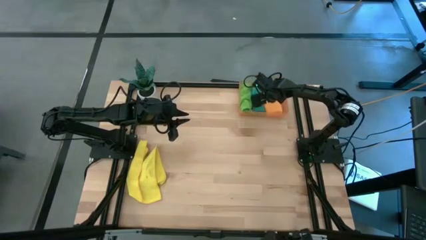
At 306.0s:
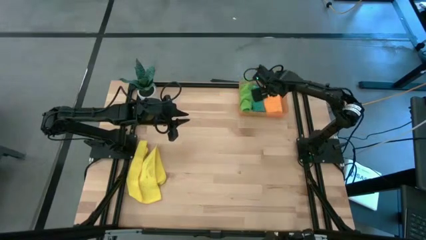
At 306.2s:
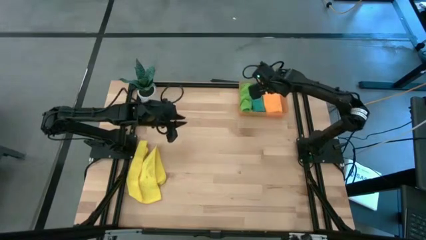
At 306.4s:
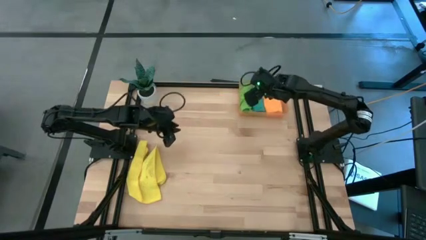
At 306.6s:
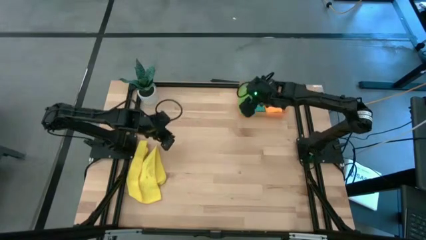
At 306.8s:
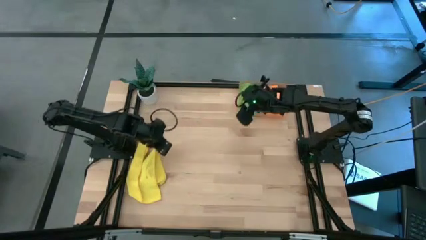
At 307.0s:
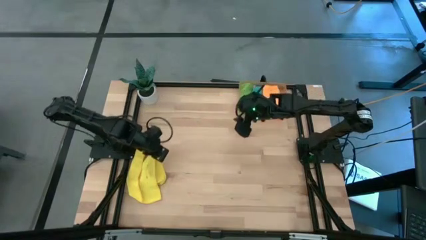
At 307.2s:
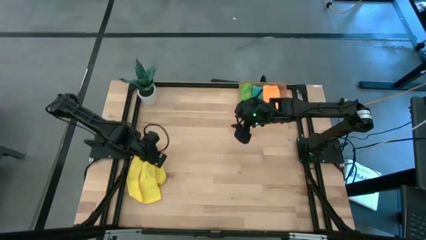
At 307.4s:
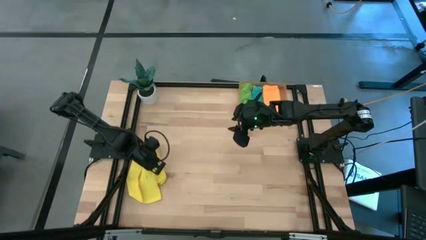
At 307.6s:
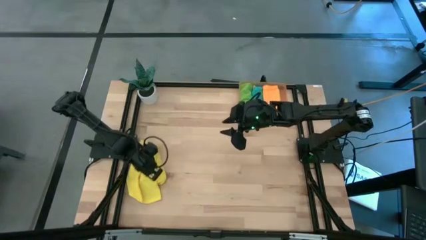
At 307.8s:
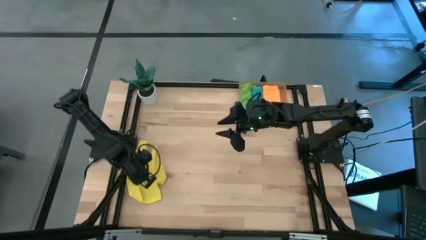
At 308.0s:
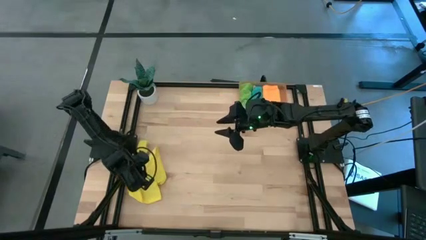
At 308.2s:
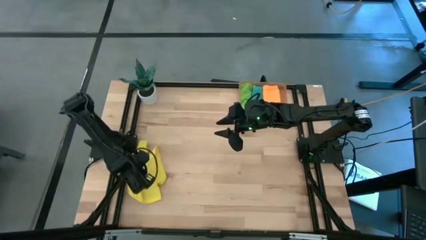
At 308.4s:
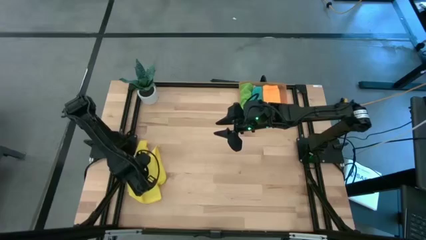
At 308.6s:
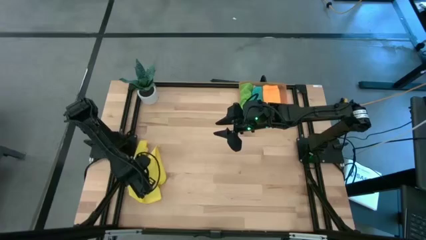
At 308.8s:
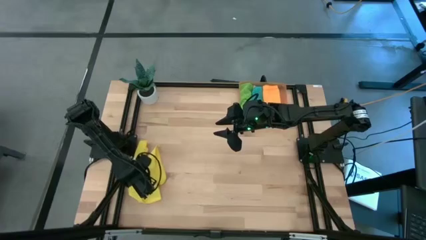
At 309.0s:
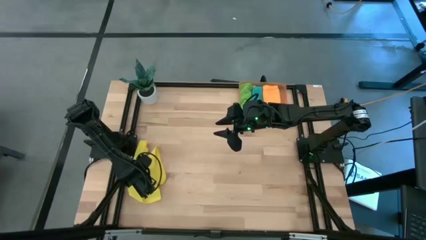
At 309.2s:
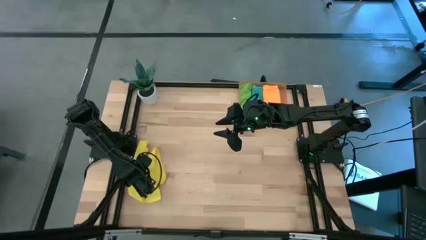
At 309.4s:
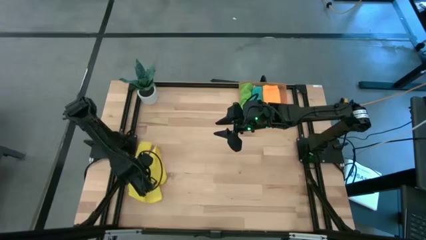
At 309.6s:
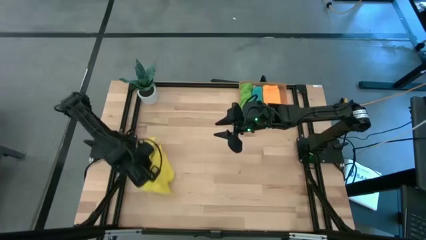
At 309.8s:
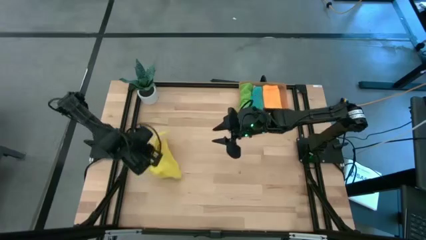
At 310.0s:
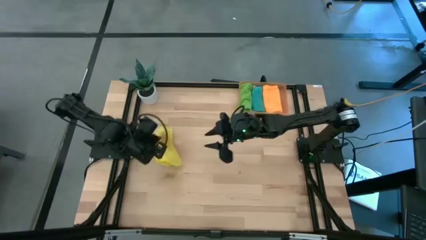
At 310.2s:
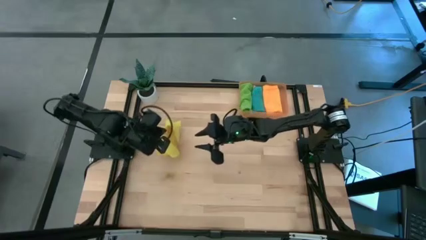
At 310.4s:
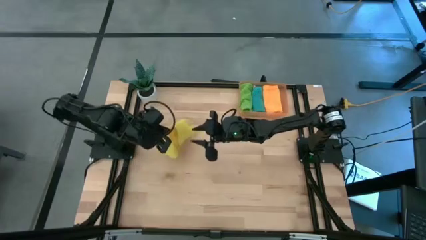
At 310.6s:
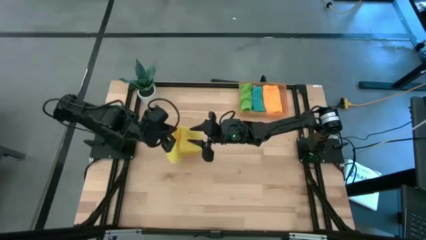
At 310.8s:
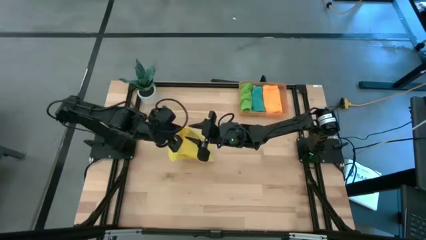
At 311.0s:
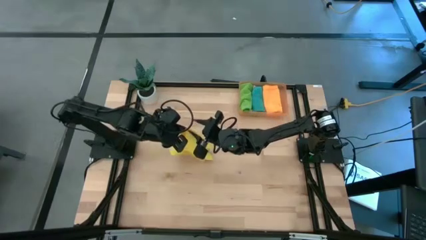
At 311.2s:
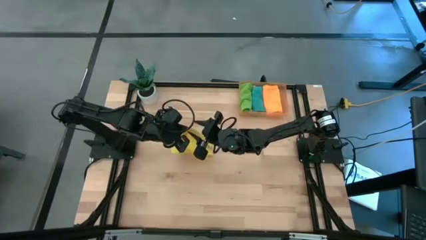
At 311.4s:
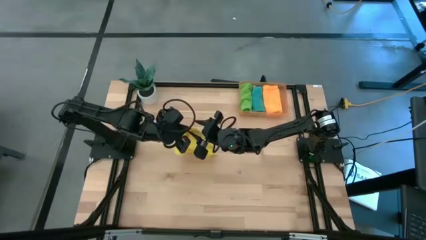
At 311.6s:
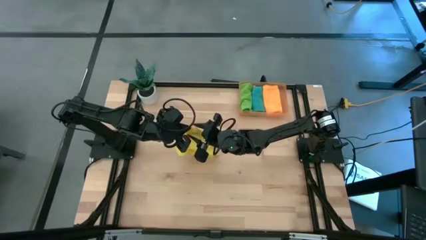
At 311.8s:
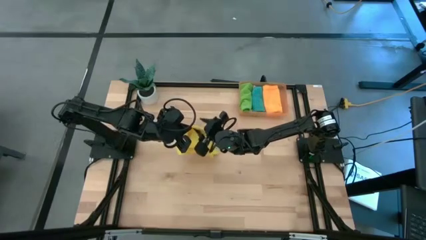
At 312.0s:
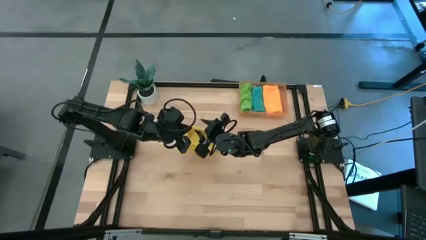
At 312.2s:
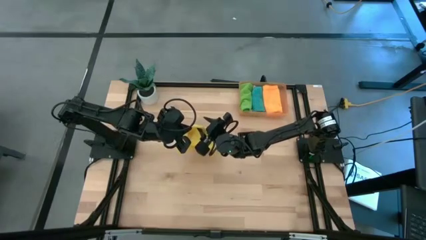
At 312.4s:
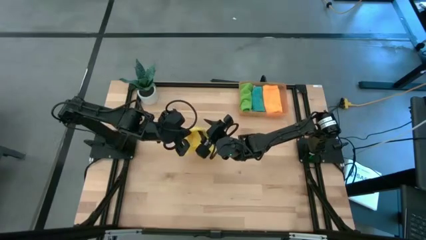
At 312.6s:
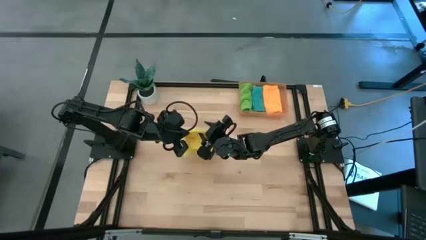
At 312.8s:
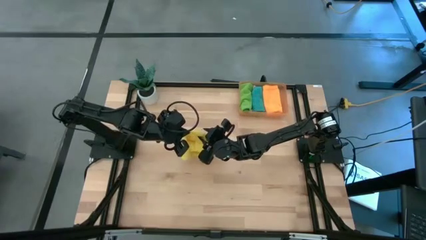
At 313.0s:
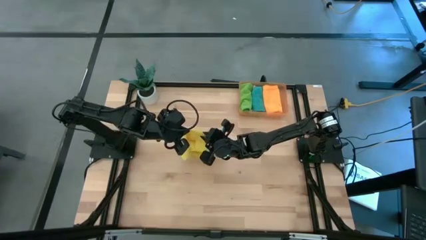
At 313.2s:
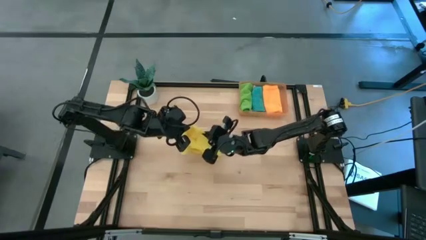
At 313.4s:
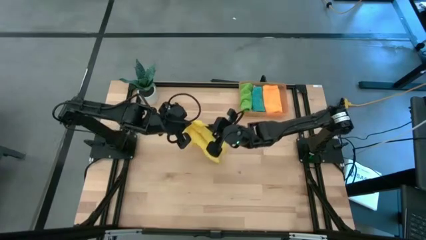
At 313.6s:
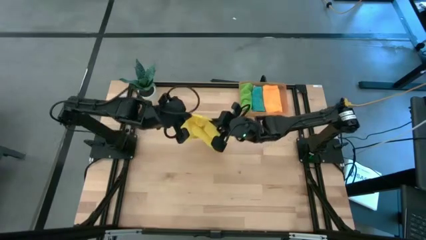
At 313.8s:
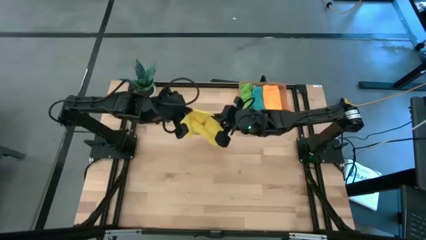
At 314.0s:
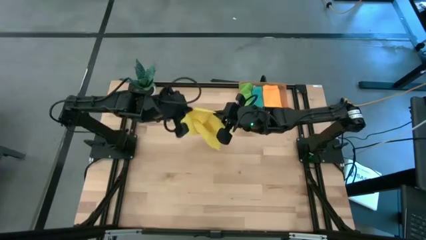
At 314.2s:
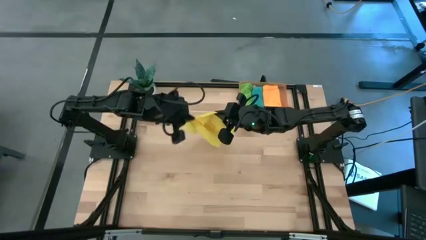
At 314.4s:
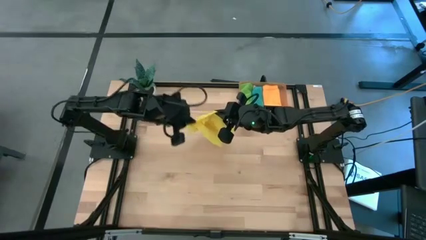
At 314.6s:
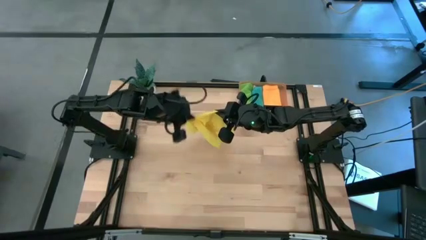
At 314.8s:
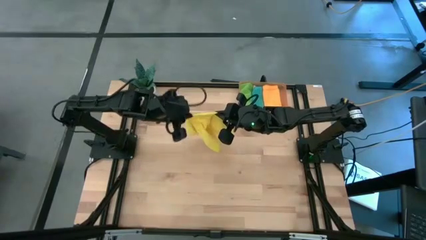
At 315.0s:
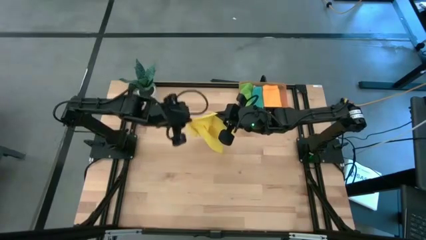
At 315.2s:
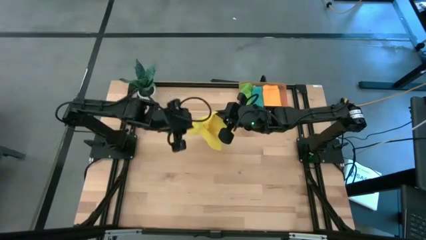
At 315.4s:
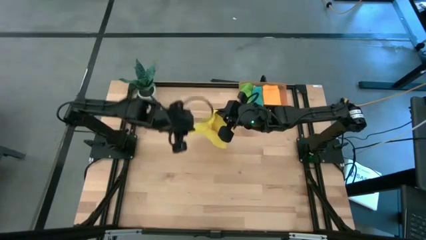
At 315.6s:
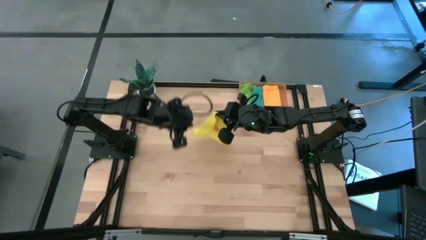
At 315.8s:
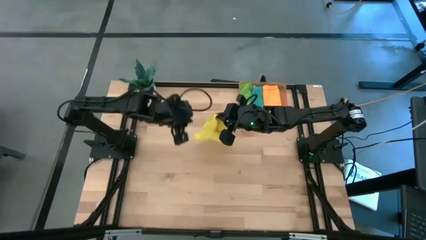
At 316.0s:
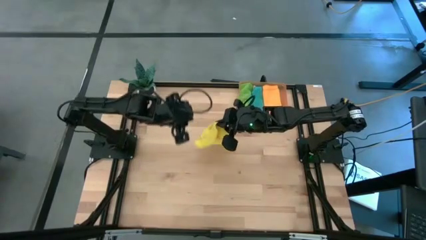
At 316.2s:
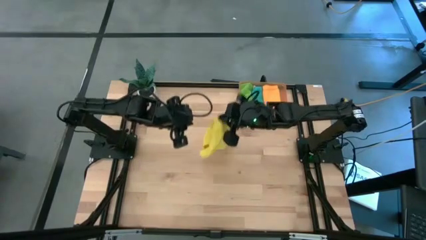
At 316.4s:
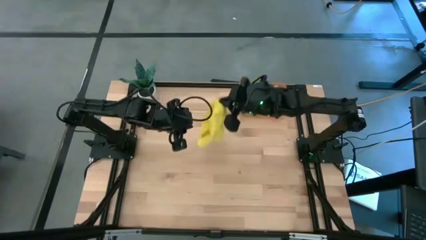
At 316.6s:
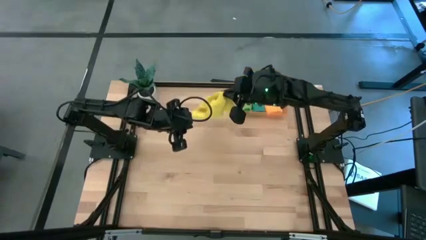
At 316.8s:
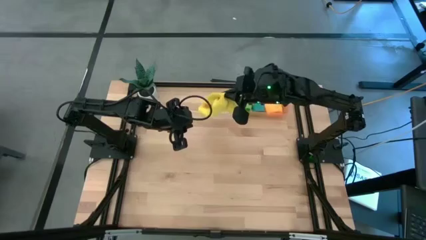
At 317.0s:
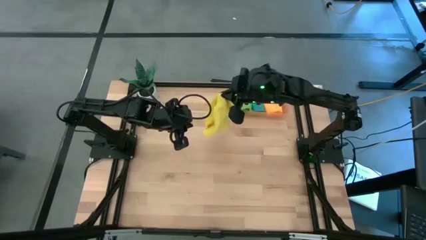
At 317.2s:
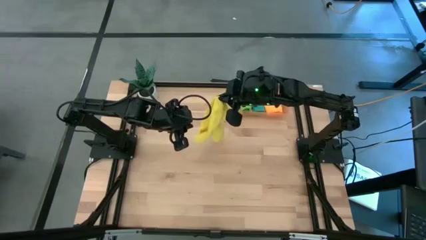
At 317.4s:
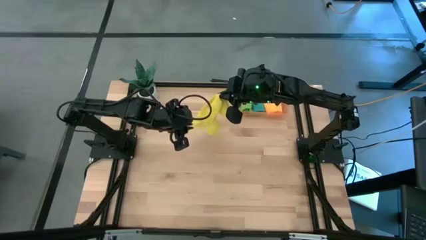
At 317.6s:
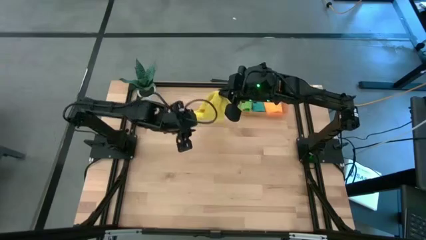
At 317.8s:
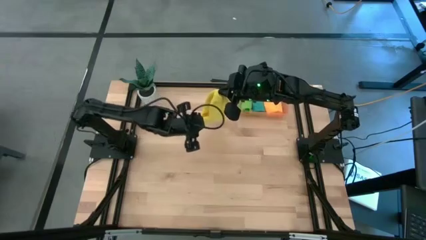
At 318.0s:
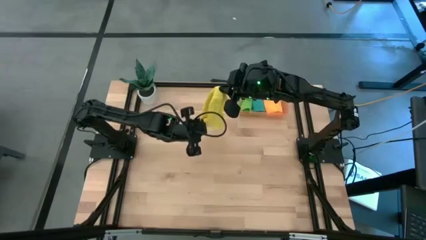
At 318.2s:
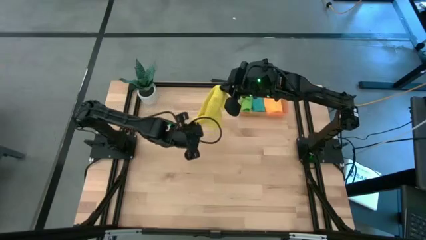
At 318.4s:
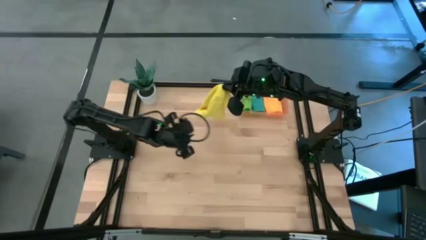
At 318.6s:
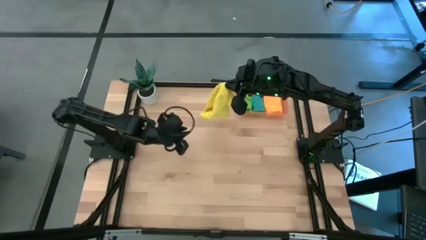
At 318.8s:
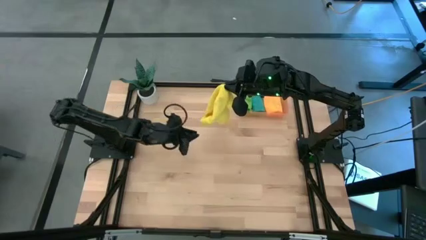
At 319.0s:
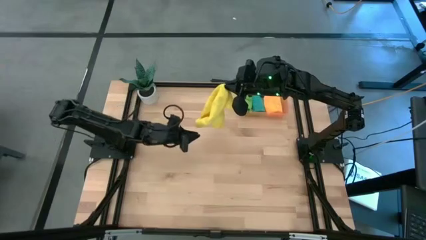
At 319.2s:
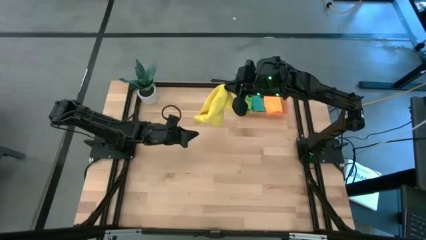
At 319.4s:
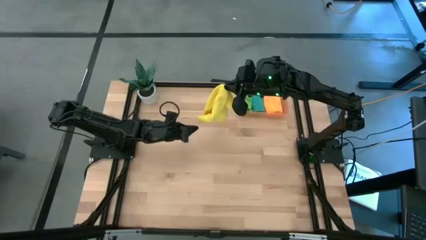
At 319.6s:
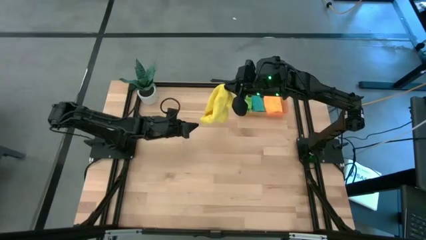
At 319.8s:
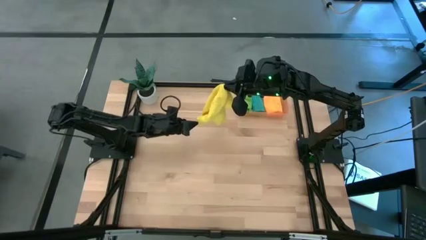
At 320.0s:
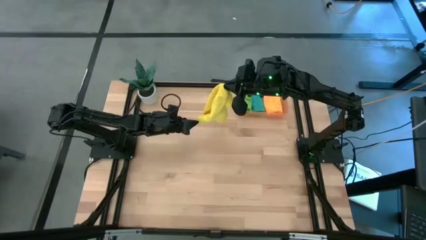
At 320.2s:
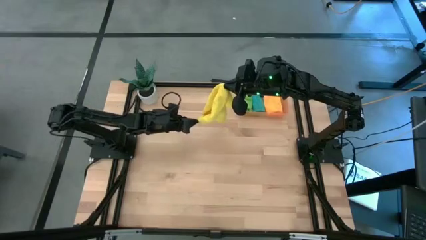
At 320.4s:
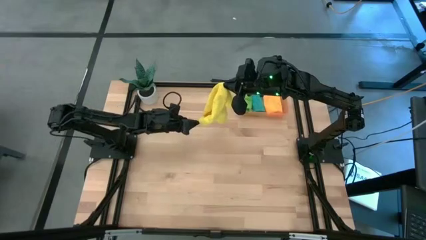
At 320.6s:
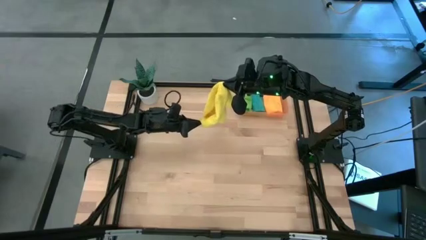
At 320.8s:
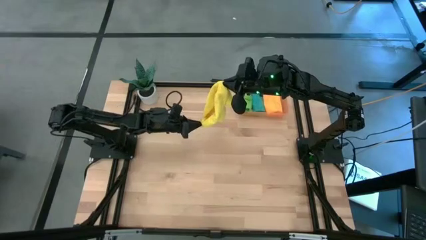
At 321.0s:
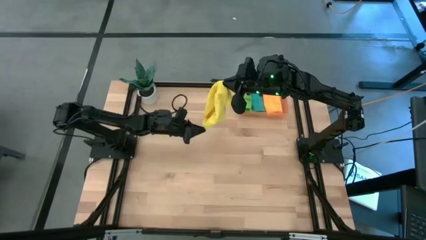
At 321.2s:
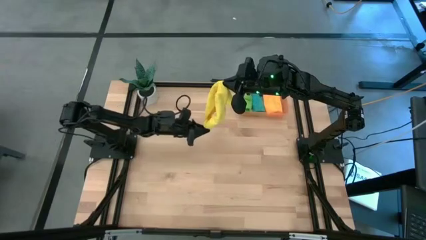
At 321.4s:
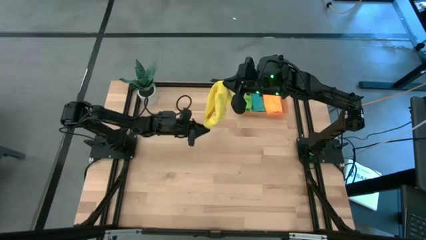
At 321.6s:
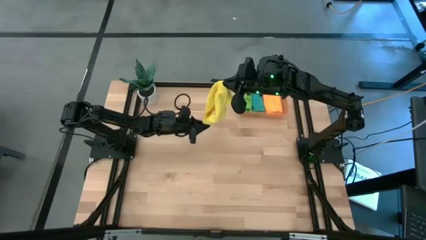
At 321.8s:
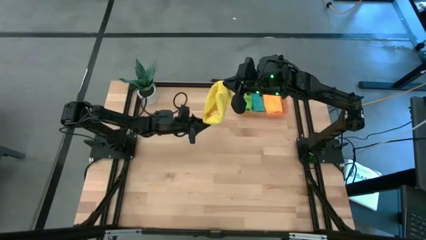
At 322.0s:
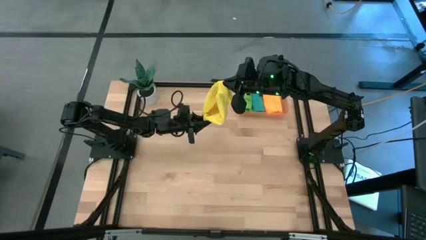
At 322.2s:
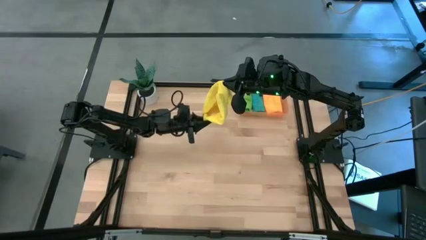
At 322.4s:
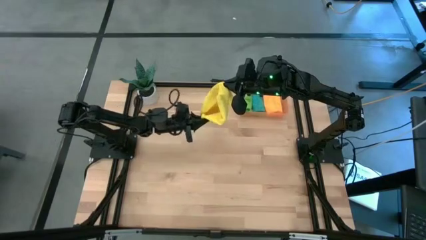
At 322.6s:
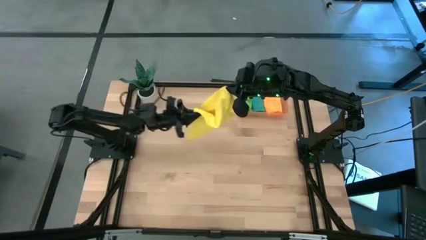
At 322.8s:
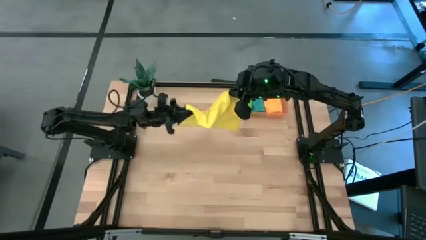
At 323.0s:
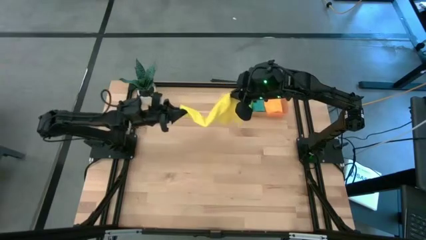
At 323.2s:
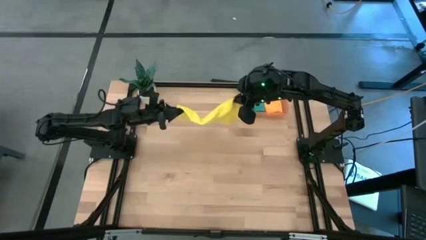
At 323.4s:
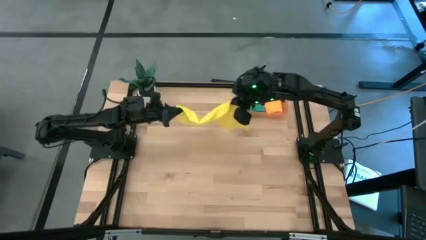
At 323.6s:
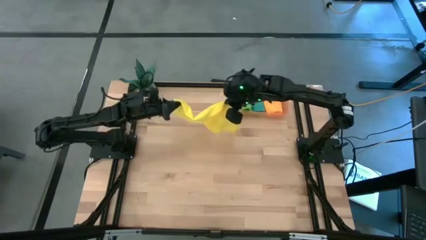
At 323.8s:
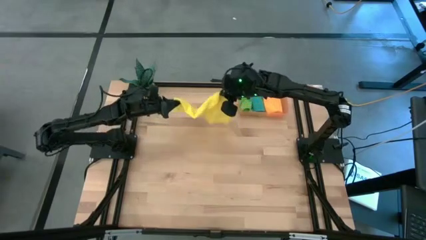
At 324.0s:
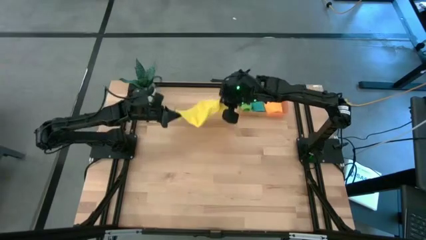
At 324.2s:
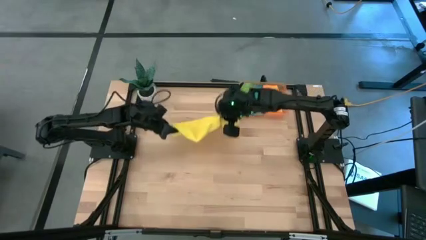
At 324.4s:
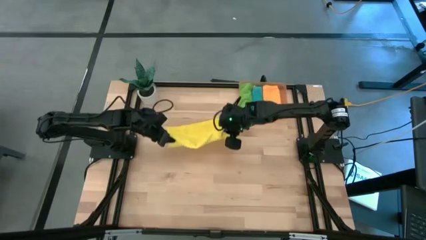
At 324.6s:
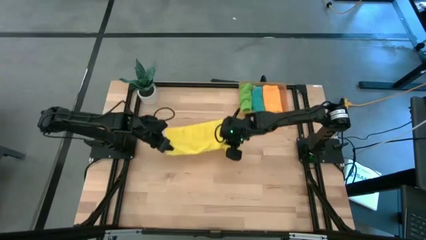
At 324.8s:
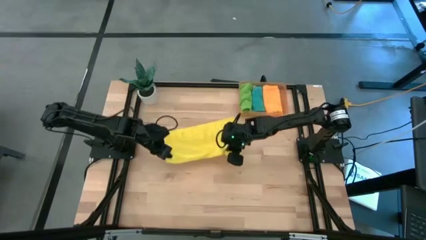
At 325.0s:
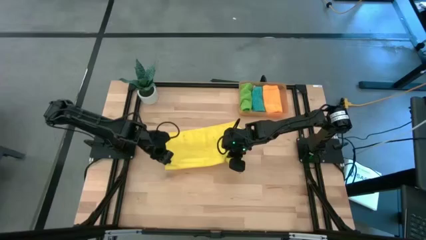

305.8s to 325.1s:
Task: Roll microfiber towels into tight, uniform cylinder then place into a basket
Fold the yellow towel
